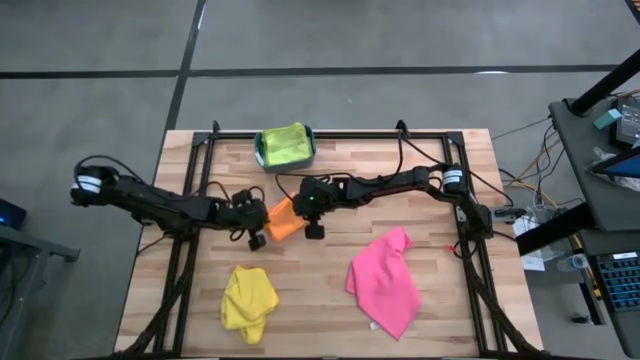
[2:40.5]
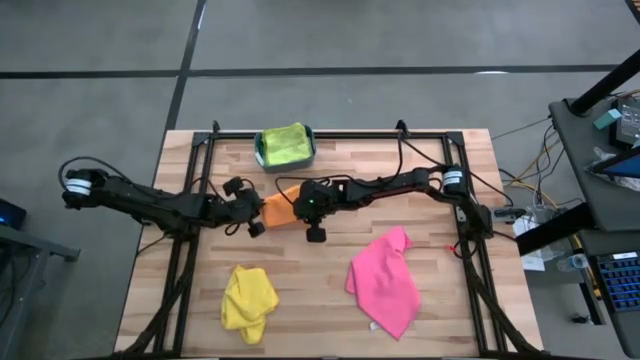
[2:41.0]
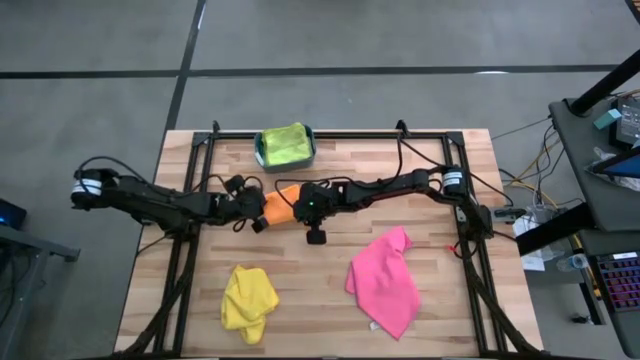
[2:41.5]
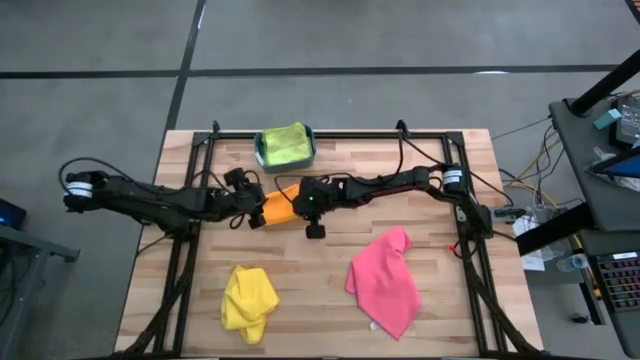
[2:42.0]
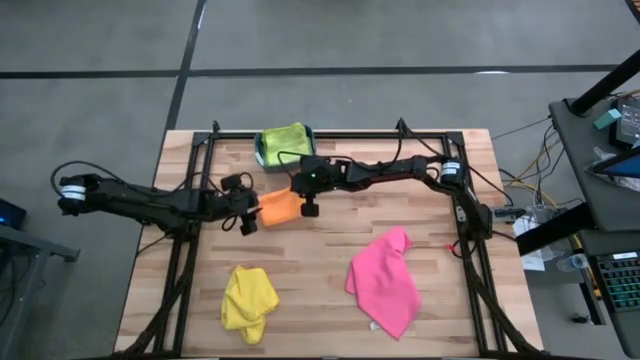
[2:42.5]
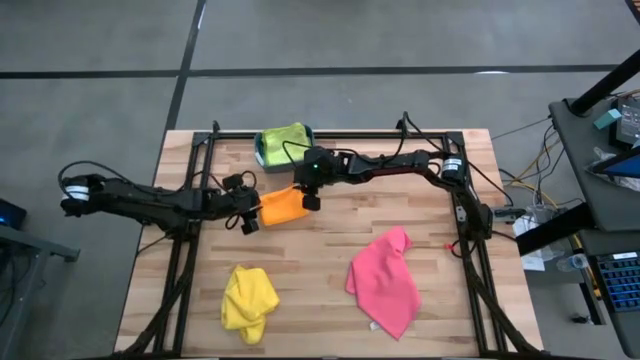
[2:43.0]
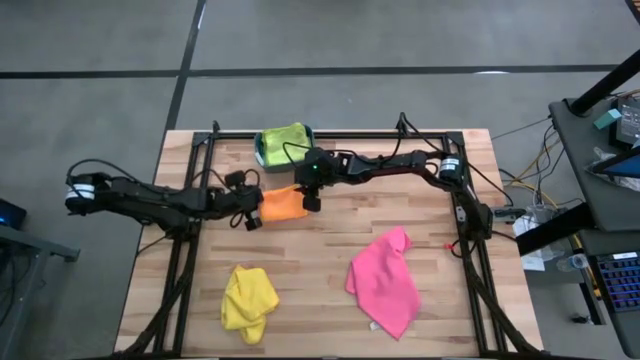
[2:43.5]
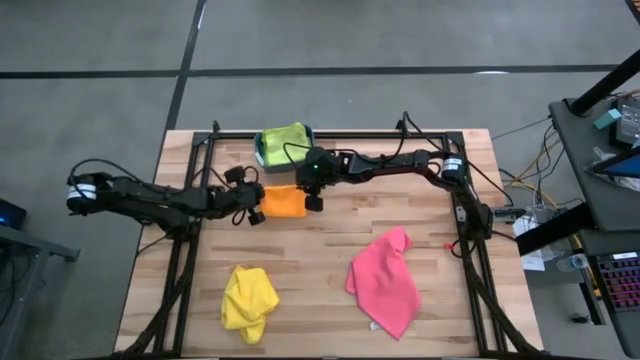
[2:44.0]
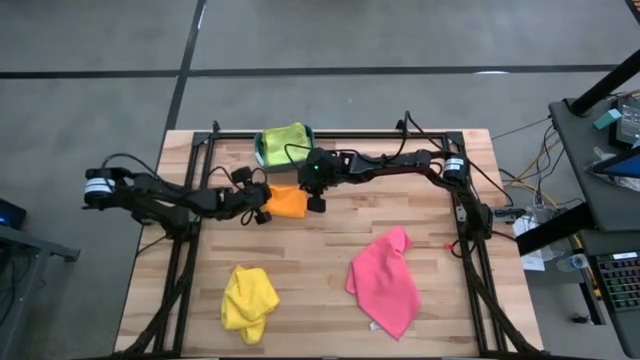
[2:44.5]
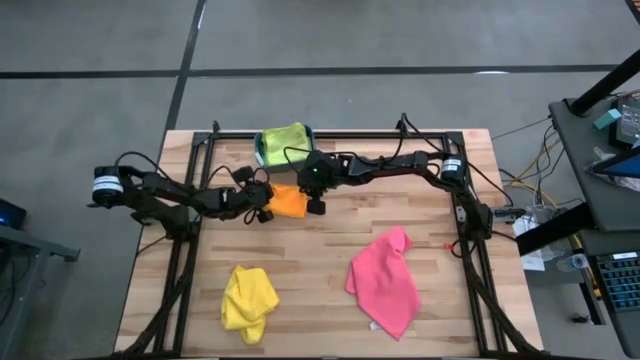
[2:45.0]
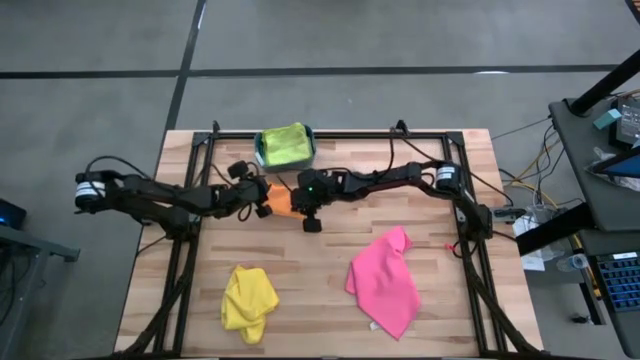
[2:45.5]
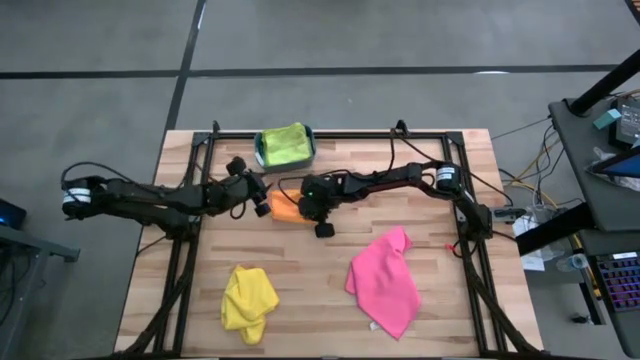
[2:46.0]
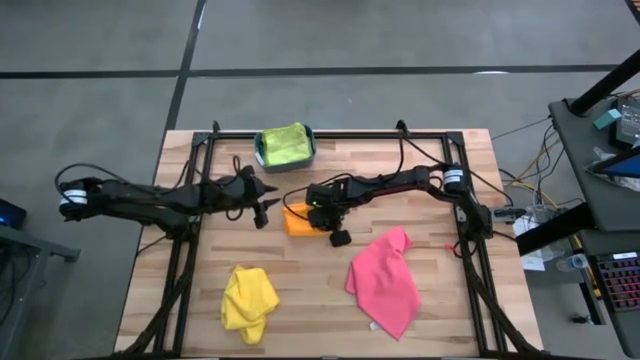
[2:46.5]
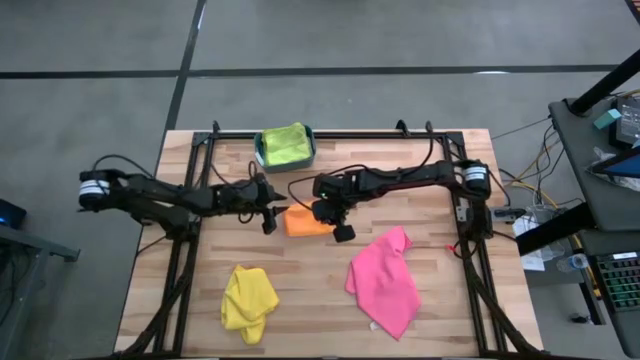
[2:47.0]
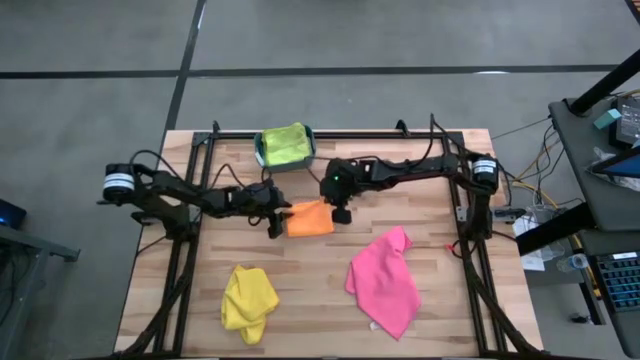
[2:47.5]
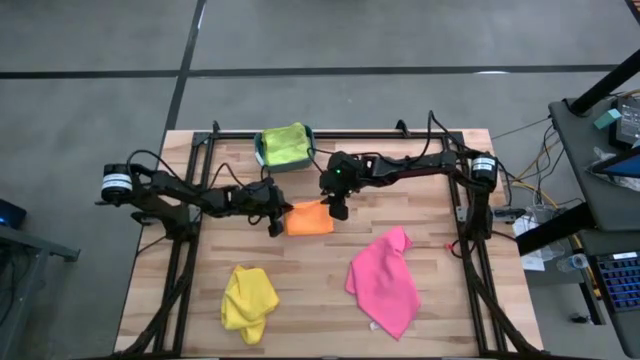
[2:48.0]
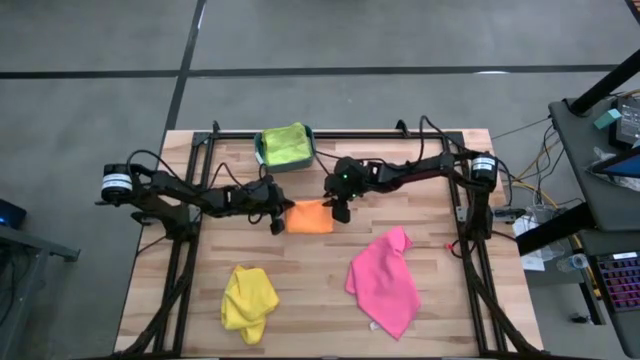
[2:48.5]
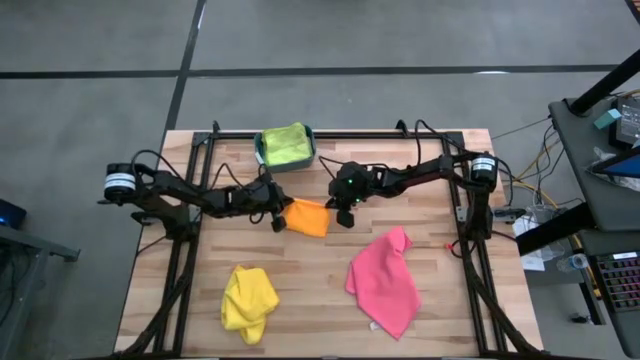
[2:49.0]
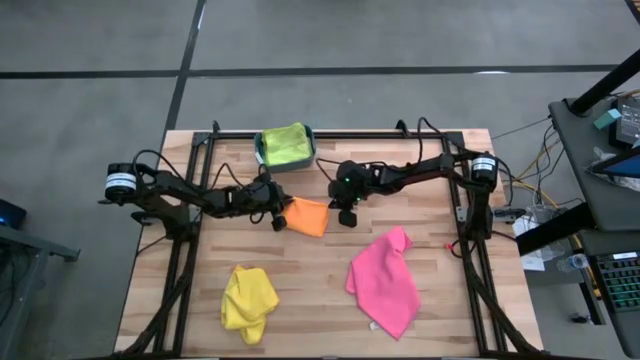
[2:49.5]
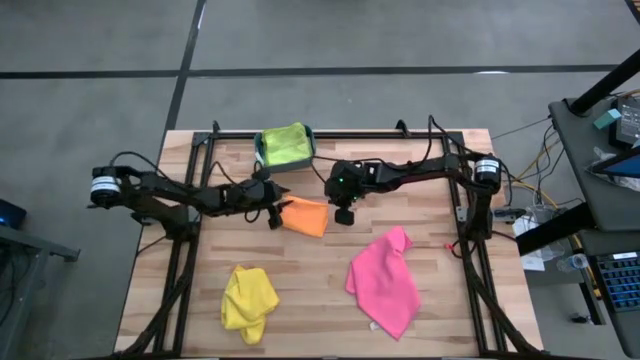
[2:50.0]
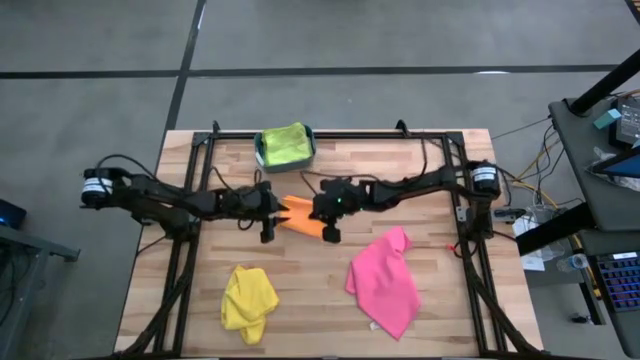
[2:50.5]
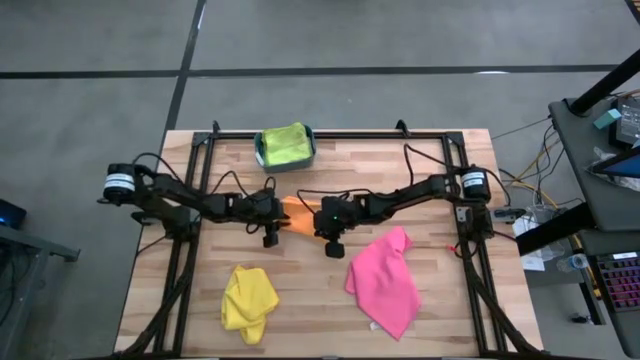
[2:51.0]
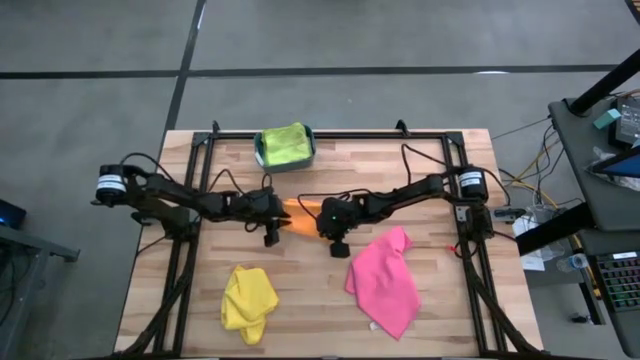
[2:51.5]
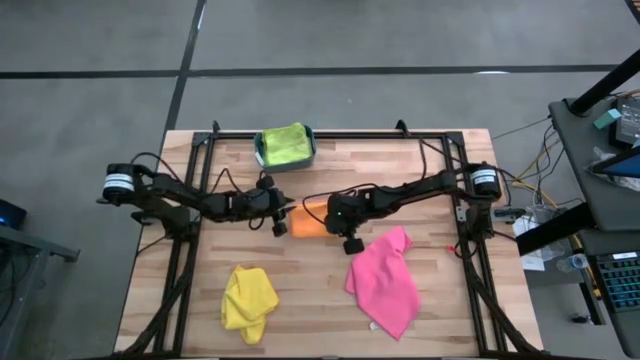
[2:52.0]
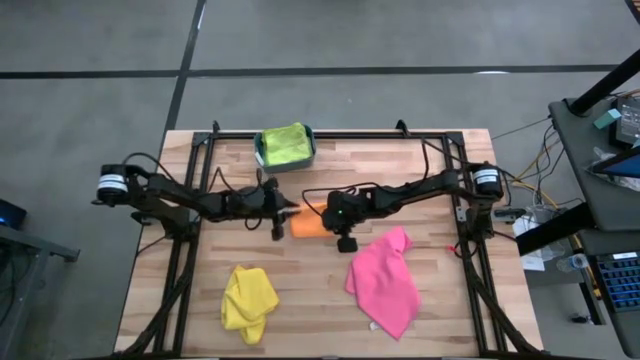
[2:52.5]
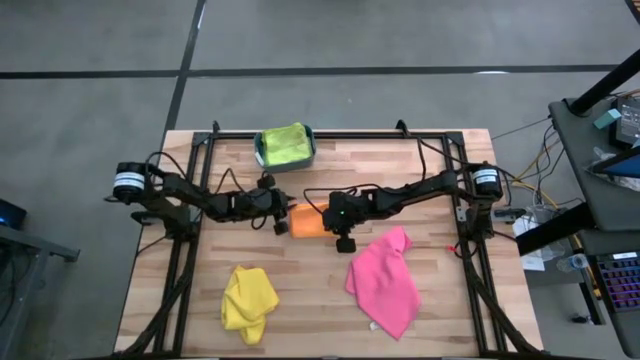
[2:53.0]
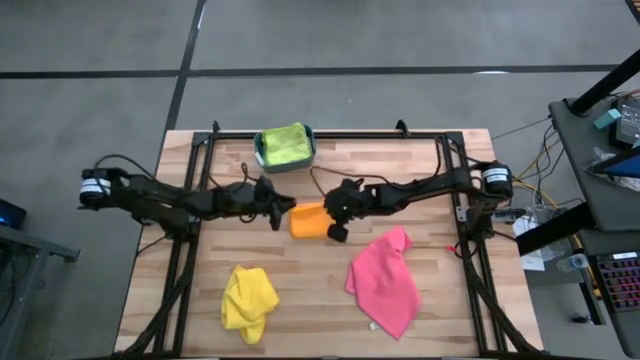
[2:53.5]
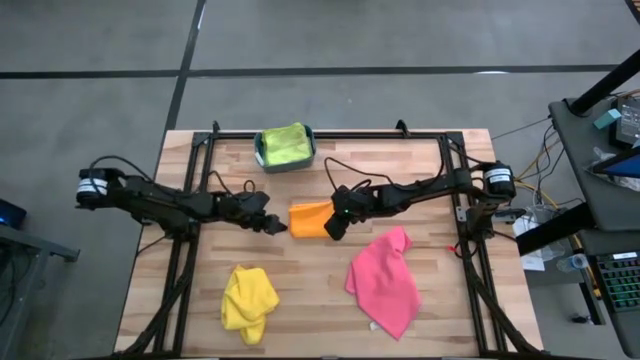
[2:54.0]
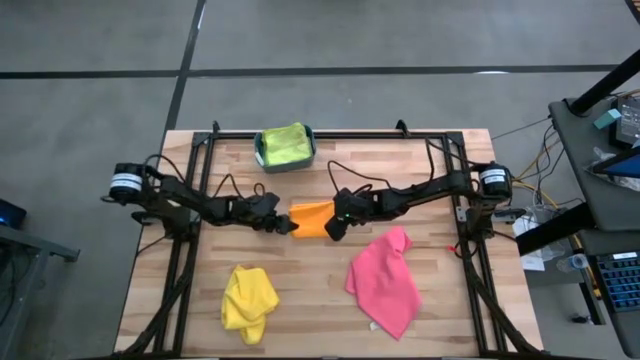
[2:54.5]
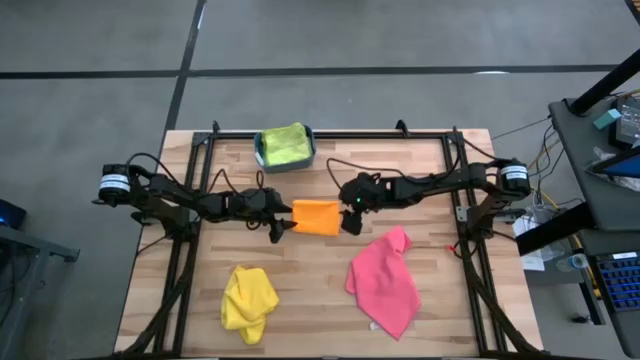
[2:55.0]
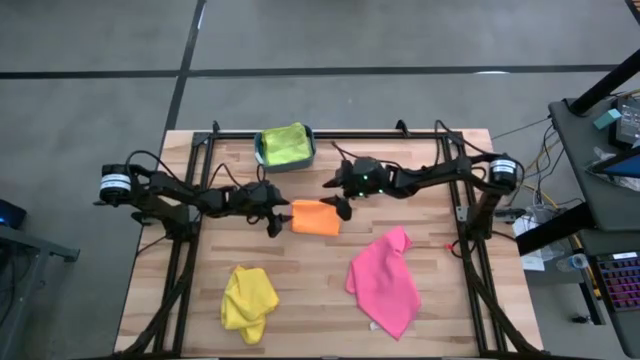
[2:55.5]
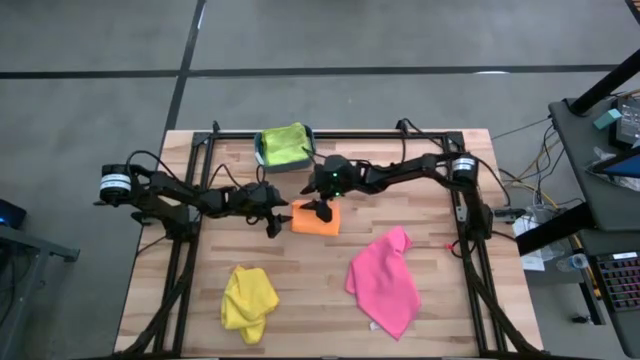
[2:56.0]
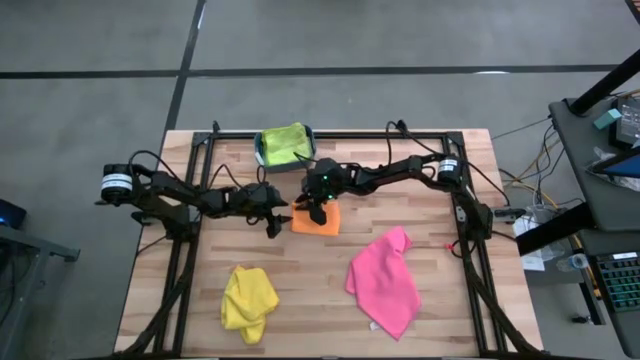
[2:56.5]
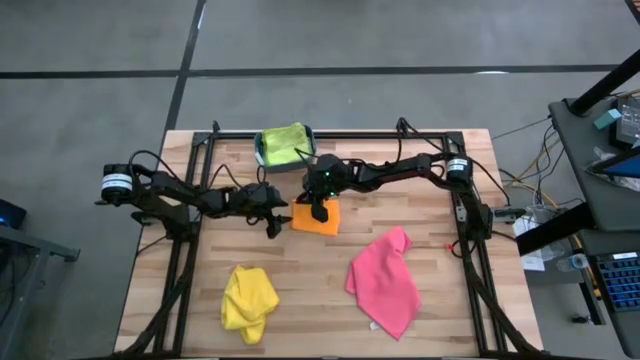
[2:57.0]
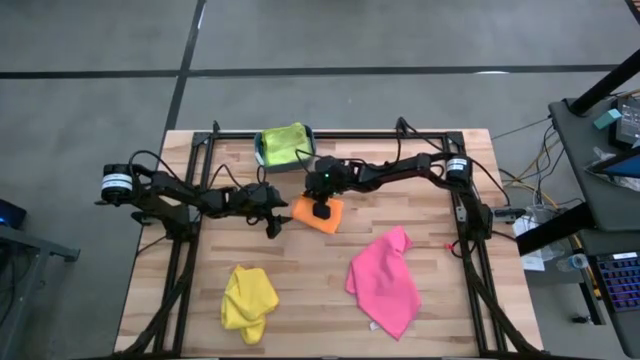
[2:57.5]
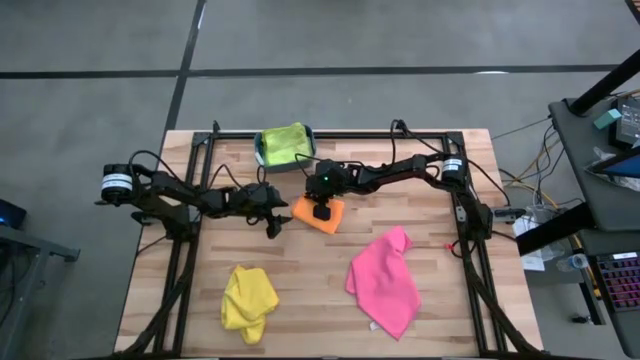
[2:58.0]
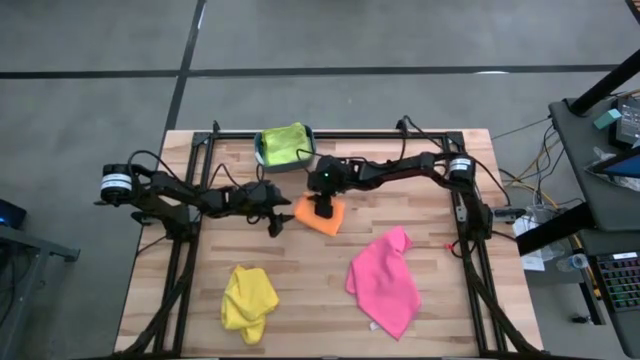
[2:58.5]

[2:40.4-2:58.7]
Task: Fold microfiber towels
Fold the orange towel

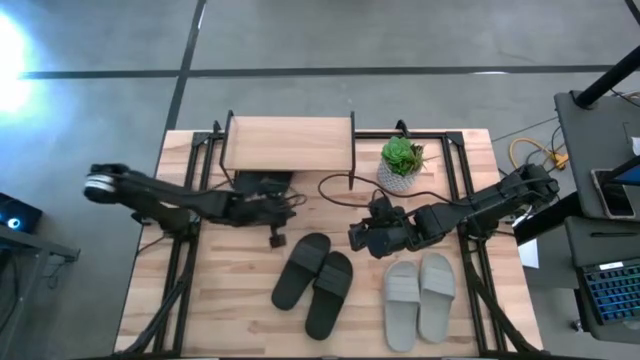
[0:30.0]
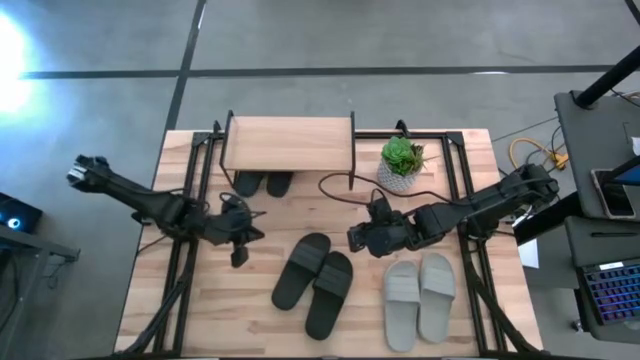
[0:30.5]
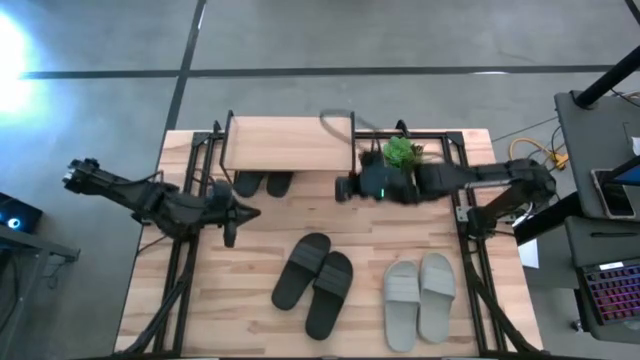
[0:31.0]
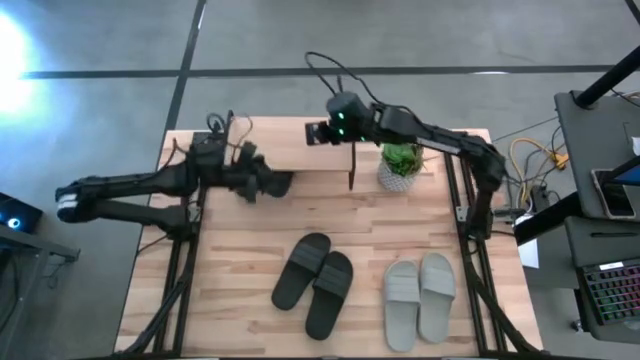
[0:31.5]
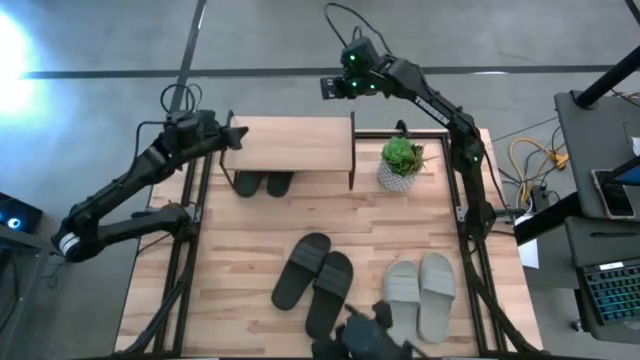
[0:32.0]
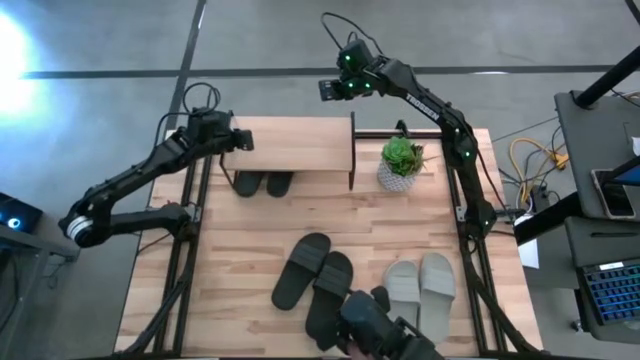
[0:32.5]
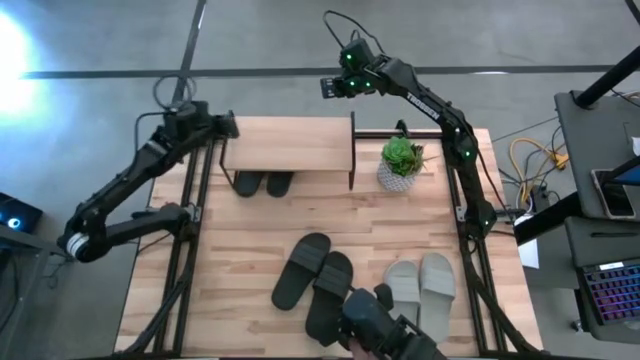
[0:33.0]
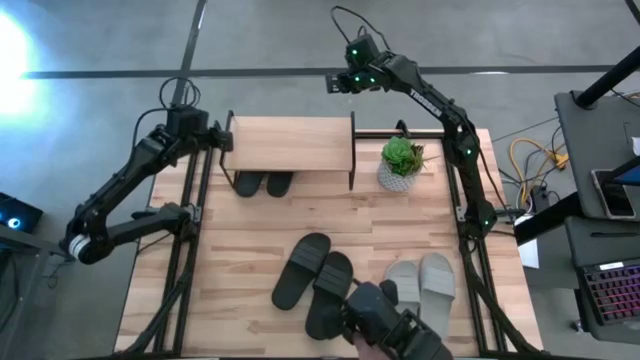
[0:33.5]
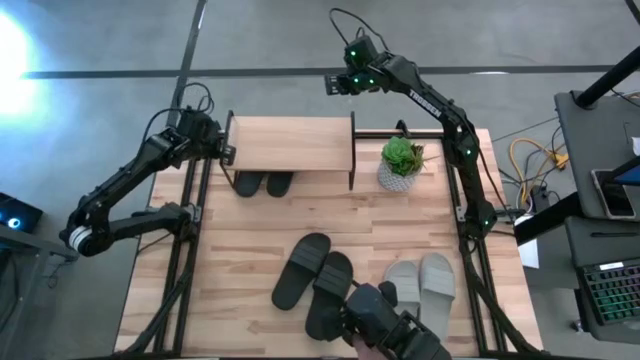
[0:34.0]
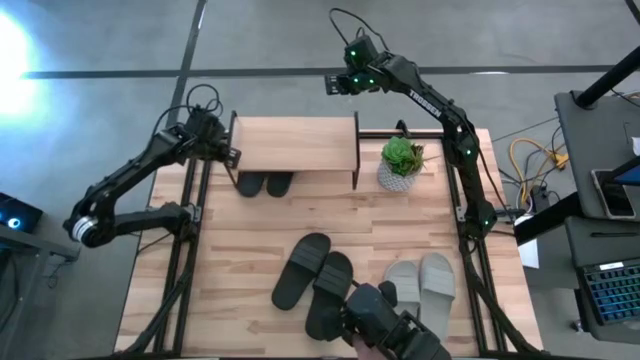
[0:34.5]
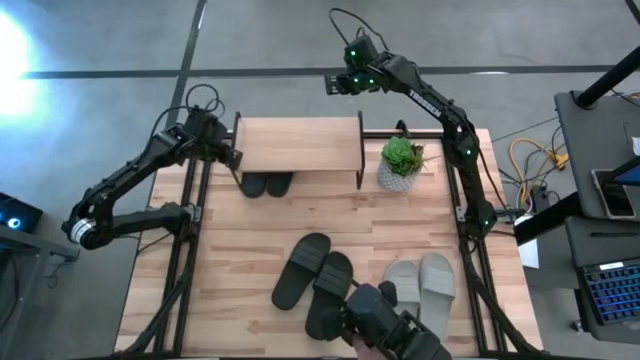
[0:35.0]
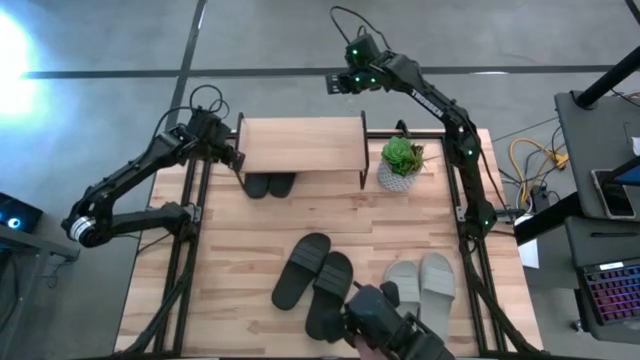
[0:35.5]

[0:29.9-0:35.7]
Task: Pick and place slides into the shelf
Adjust the shelf
